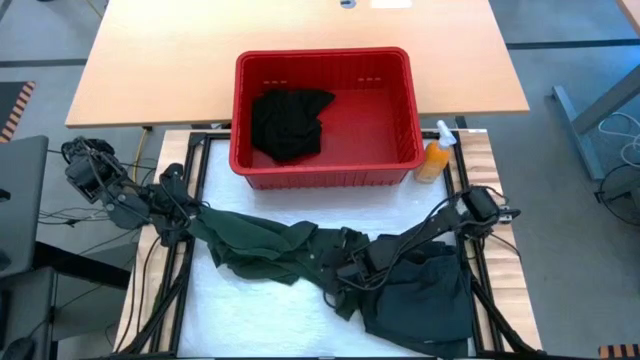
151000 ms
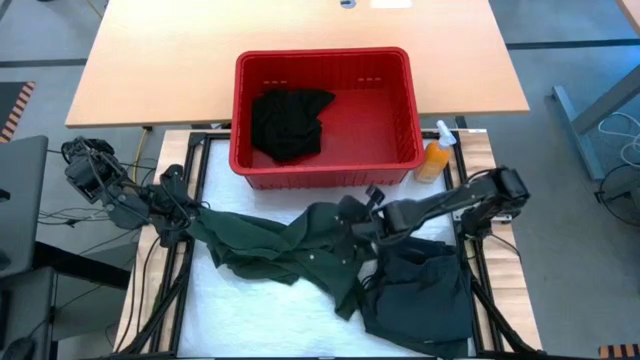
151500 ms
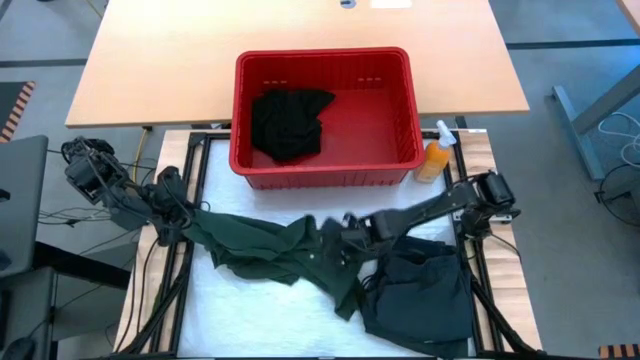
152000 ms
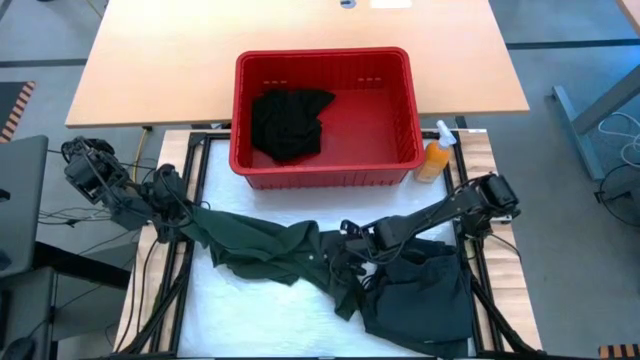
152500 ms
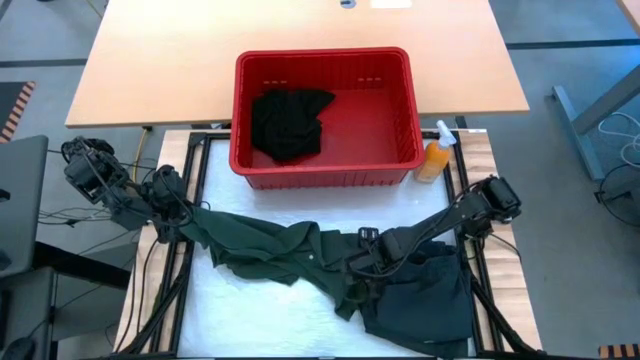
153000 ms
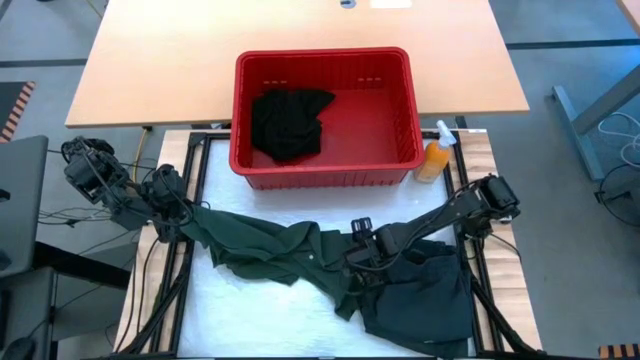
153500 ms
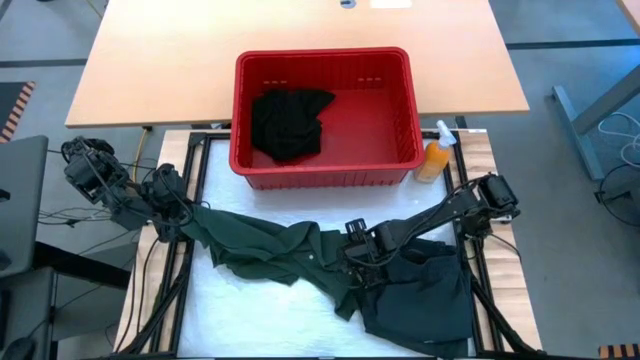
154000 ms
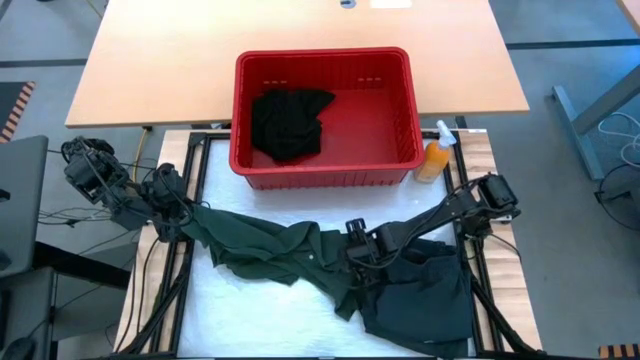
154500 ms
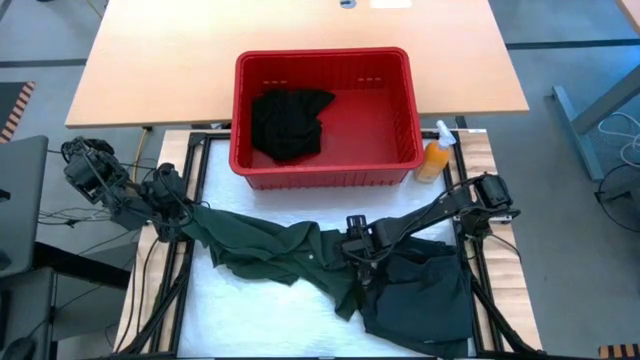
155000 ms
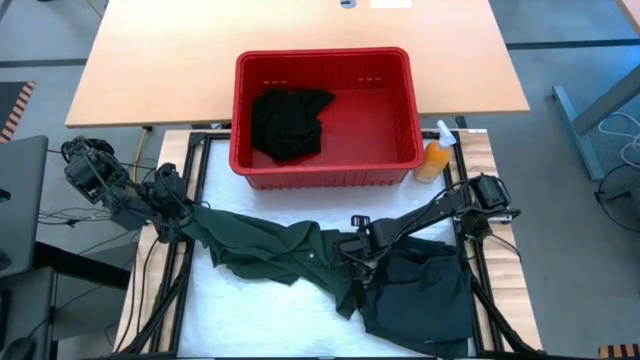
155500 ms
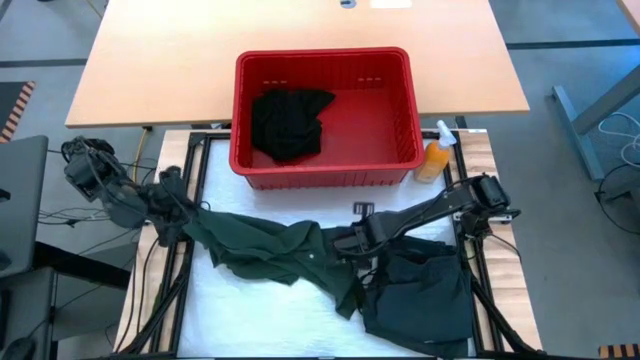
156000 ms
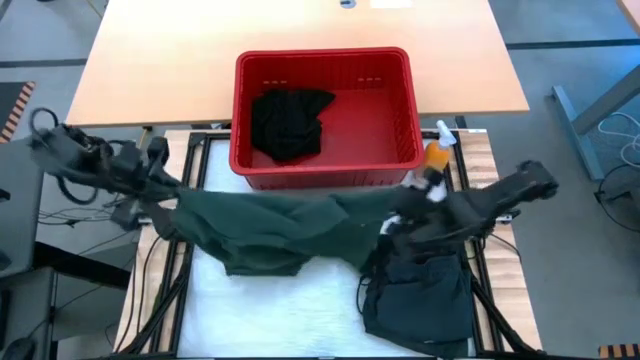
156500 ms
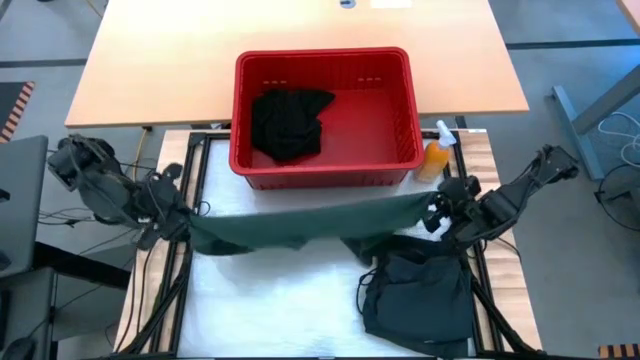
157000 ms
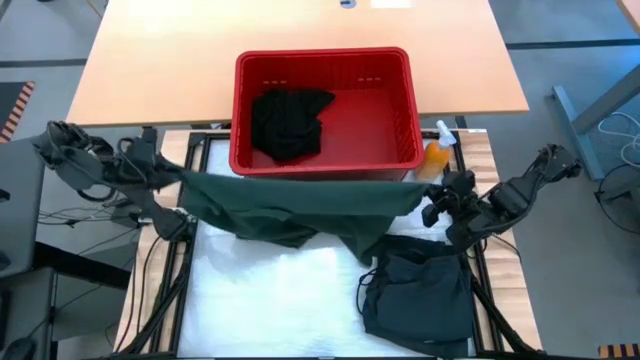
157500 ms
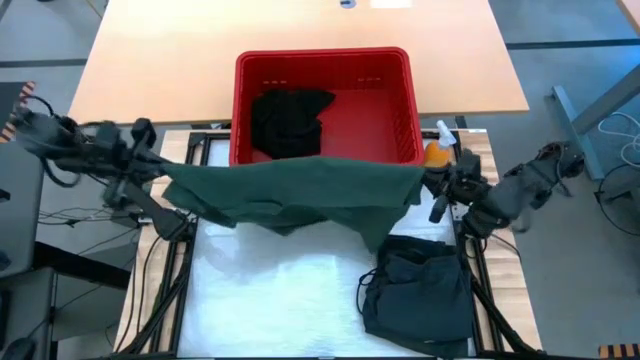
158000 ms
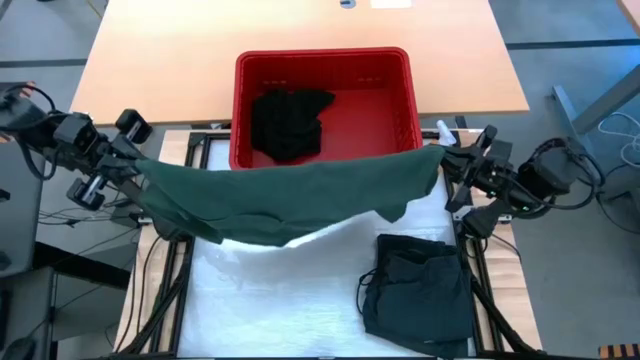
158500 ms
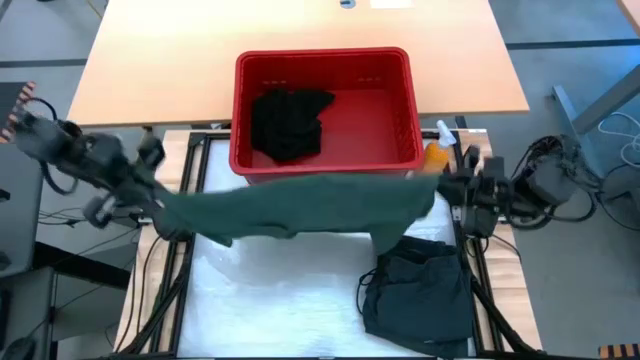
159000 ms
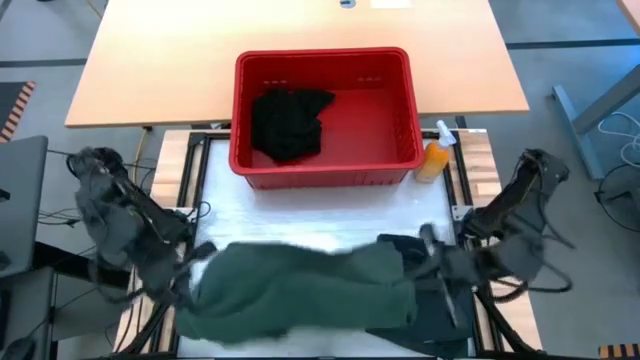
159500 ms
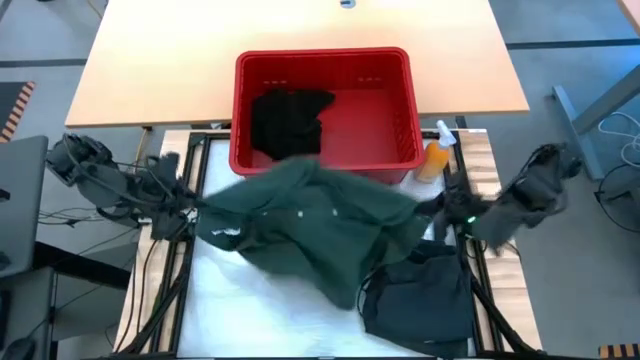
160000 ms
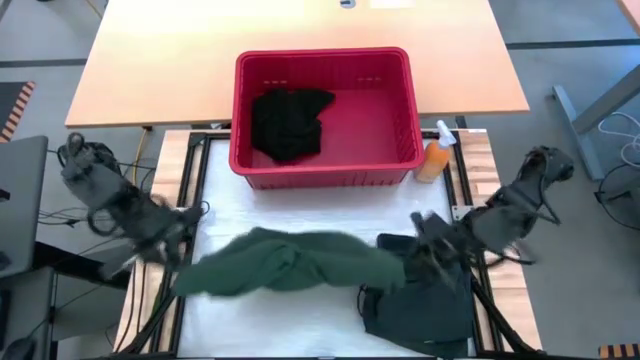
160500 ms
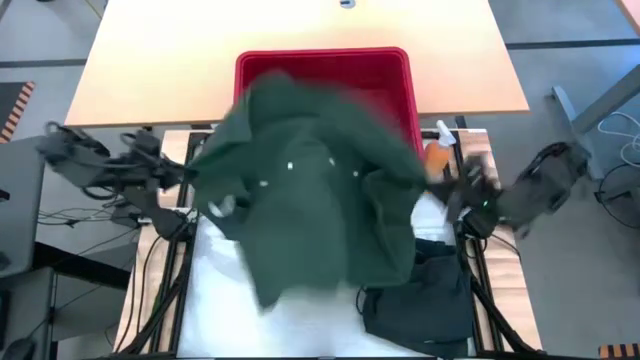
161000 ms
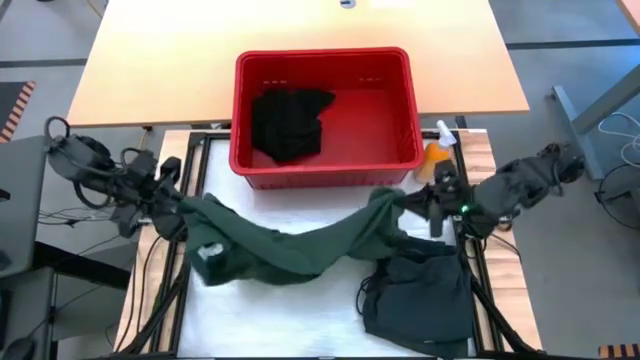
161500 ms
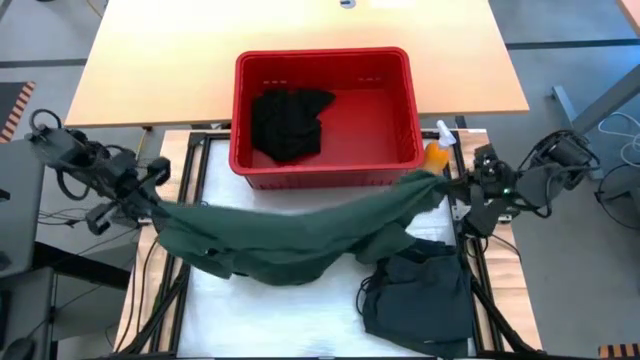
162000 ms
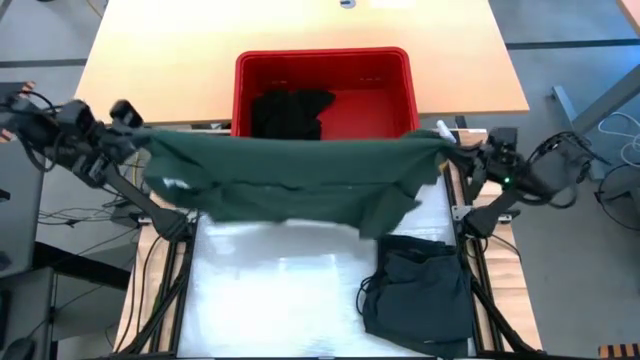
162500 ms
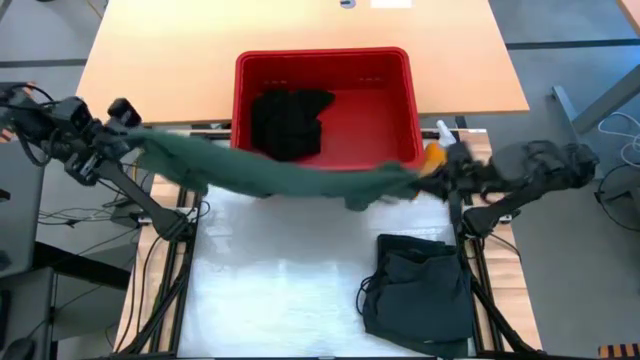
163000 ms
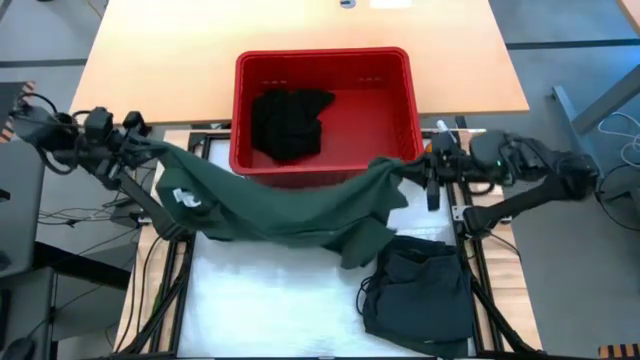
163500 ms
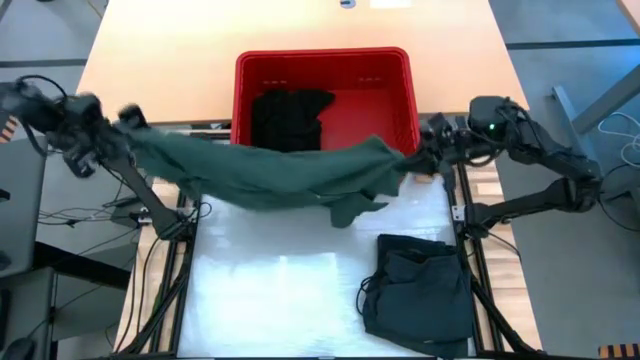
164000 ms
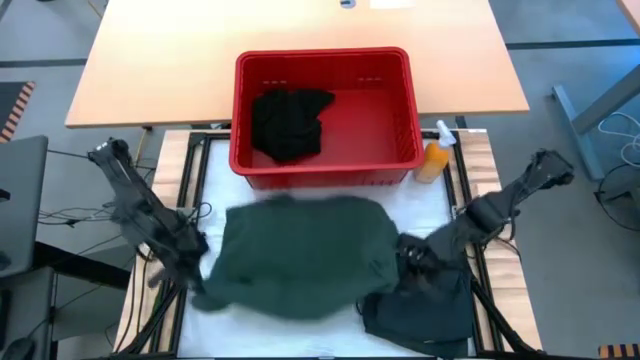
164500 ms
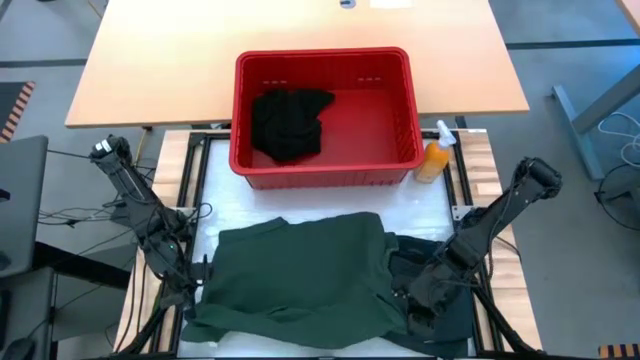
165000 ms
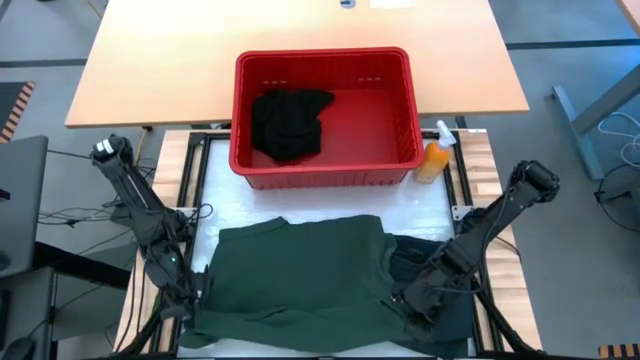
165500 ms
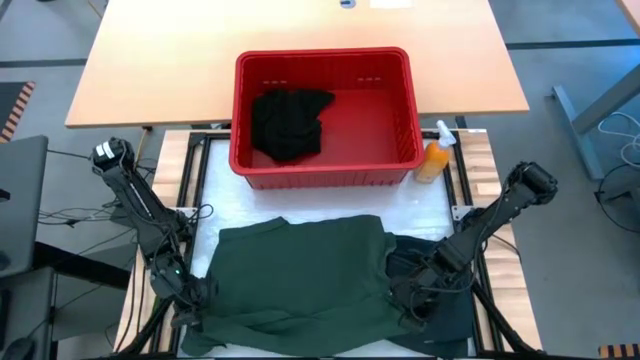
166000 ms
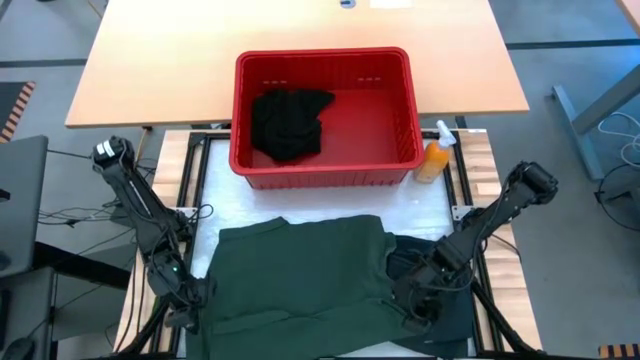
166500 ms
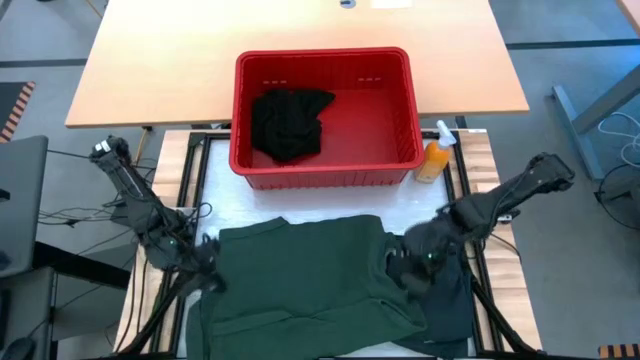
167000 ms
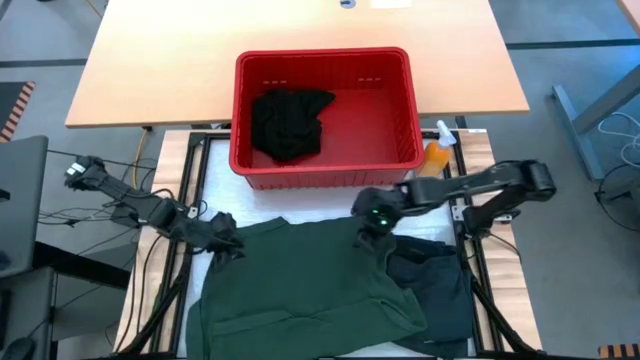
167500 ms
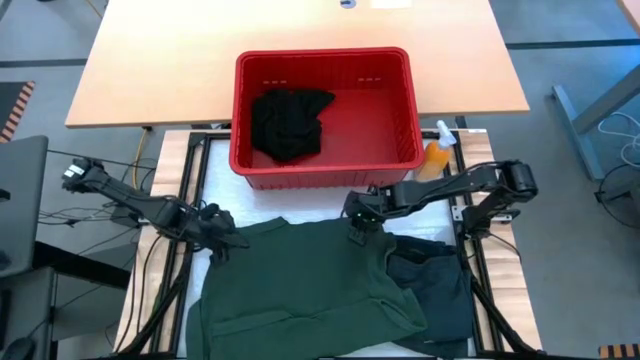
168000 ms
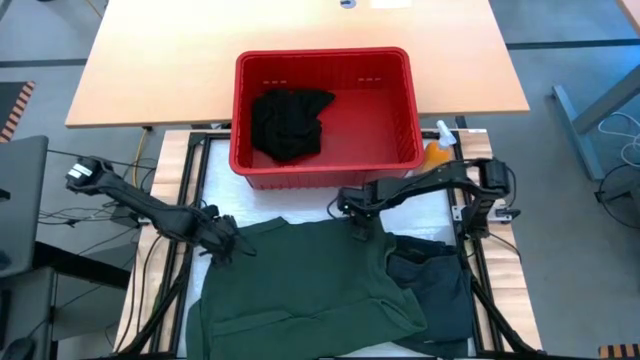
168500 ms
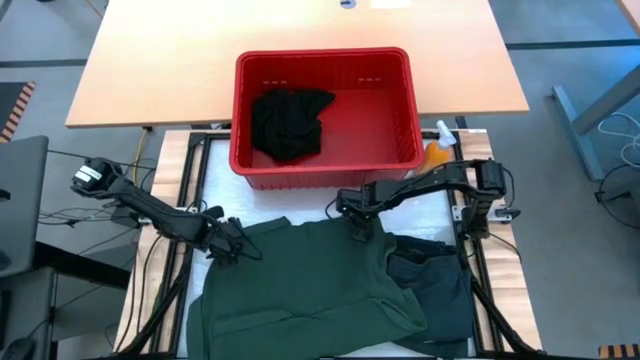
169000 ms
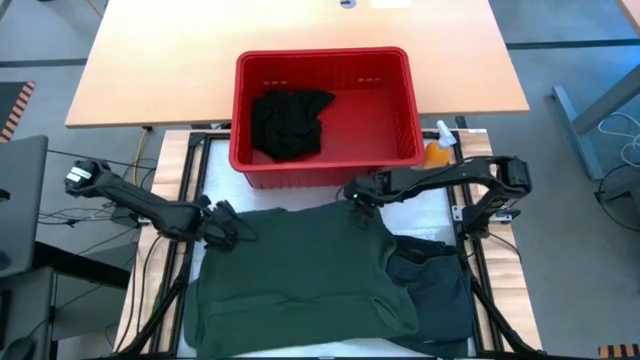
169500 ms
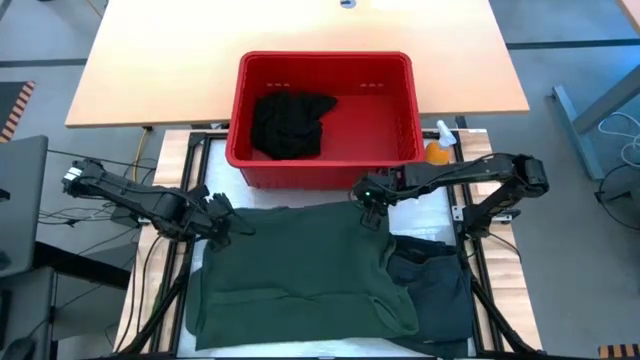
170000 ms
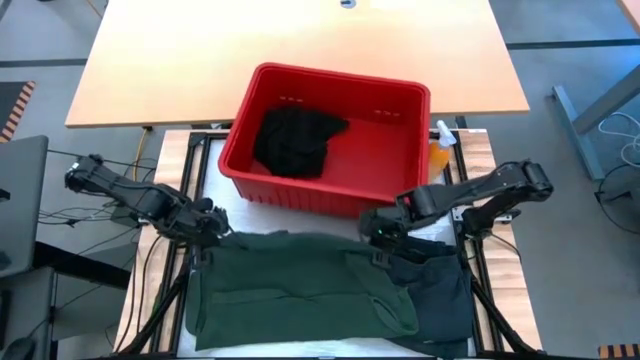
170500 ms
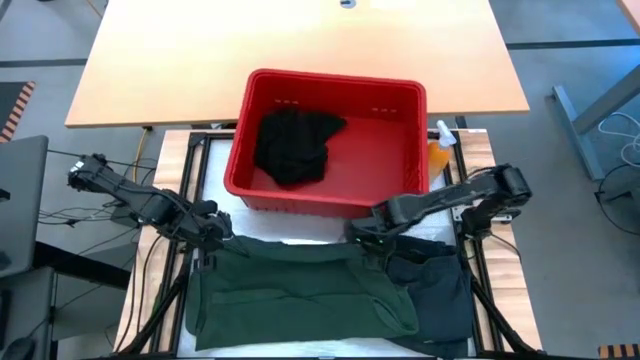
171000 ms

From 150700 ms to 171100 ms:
Task: Fold laundry
Fold the green shirt
